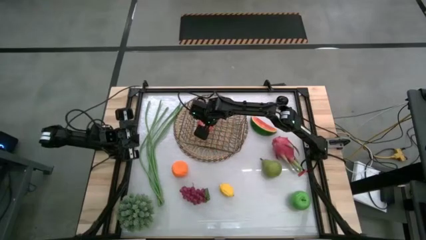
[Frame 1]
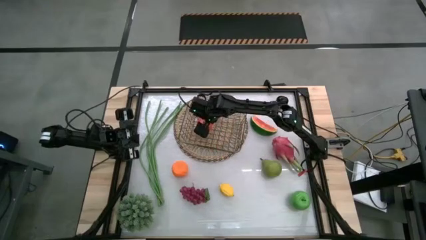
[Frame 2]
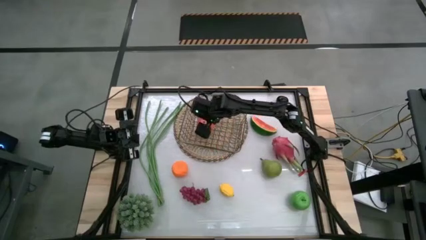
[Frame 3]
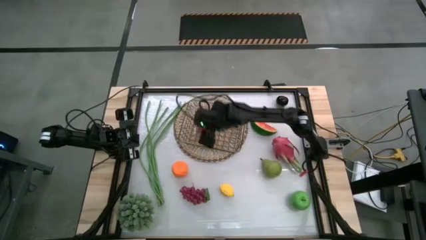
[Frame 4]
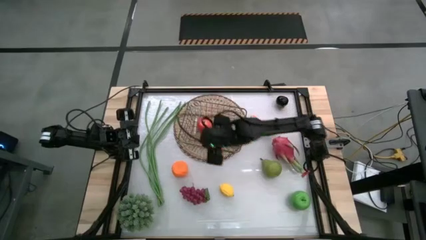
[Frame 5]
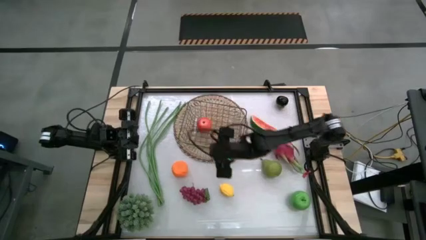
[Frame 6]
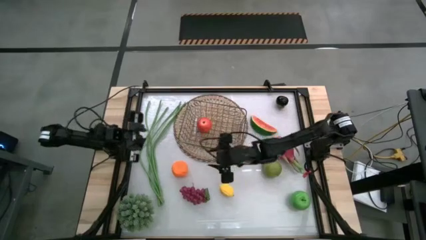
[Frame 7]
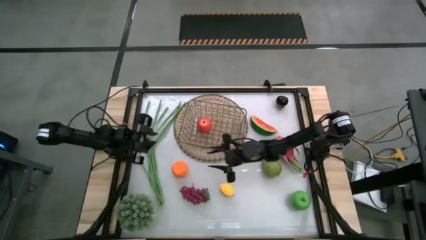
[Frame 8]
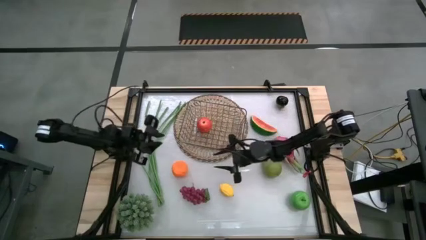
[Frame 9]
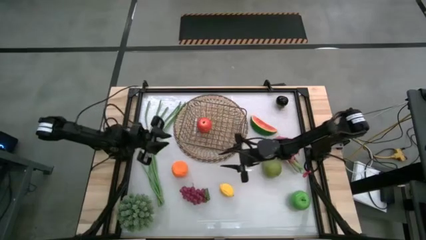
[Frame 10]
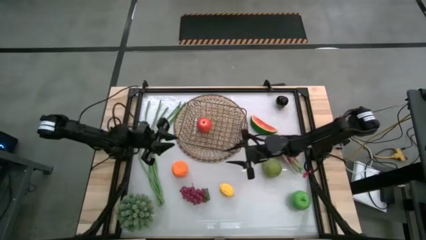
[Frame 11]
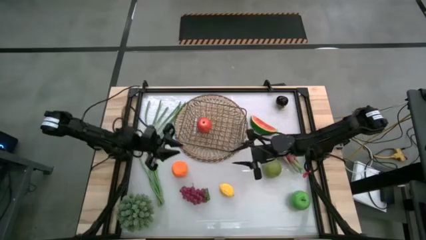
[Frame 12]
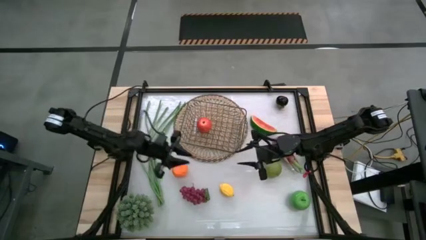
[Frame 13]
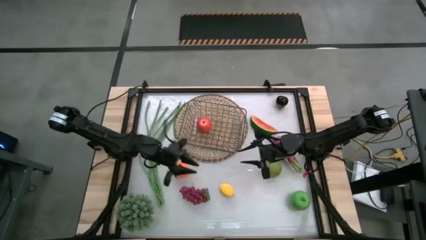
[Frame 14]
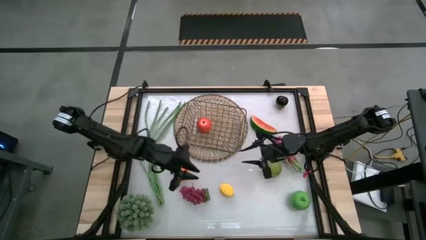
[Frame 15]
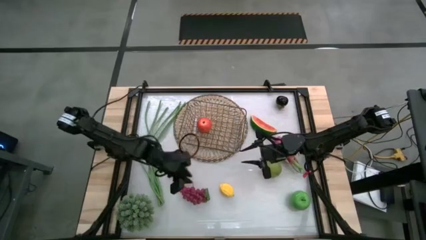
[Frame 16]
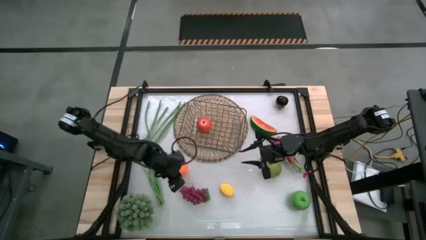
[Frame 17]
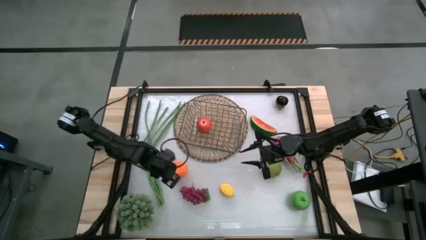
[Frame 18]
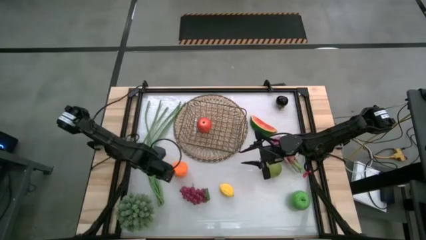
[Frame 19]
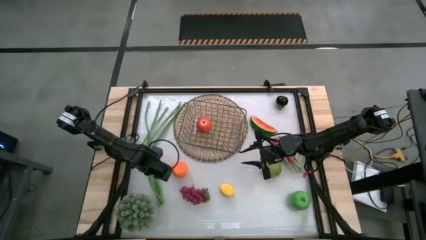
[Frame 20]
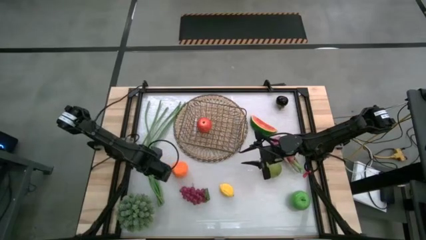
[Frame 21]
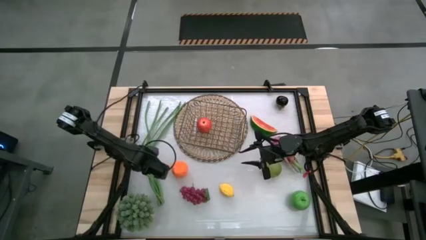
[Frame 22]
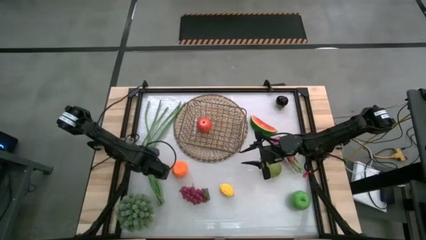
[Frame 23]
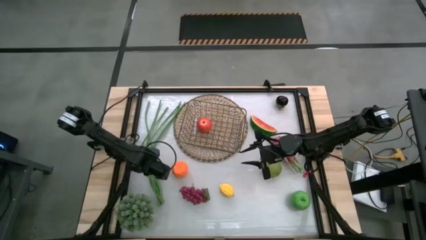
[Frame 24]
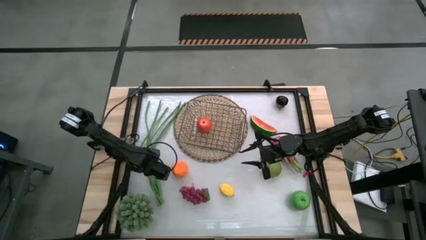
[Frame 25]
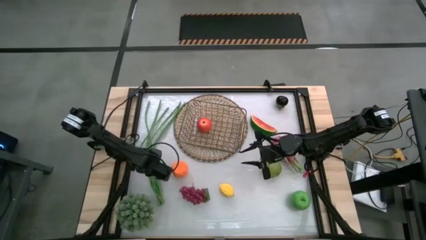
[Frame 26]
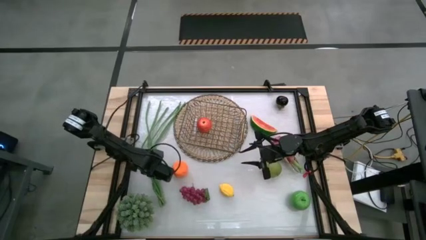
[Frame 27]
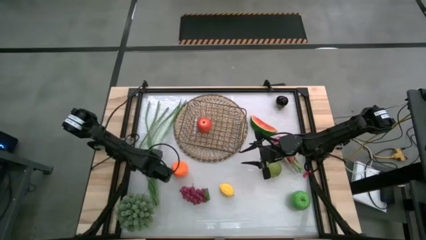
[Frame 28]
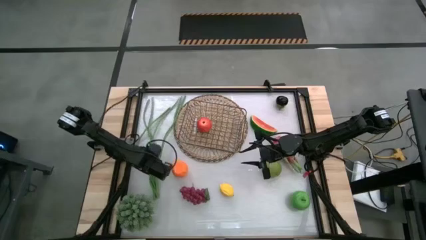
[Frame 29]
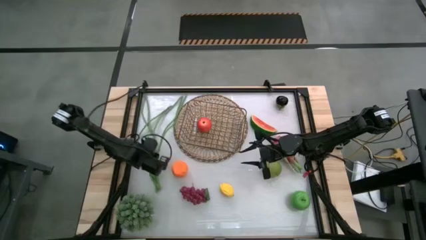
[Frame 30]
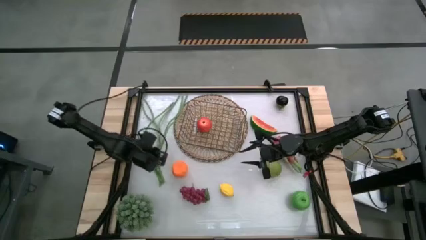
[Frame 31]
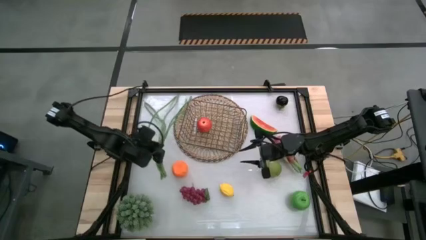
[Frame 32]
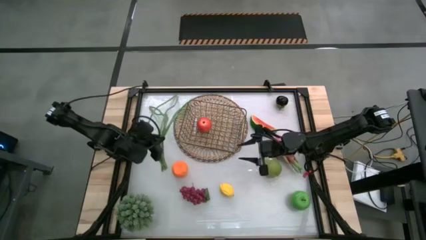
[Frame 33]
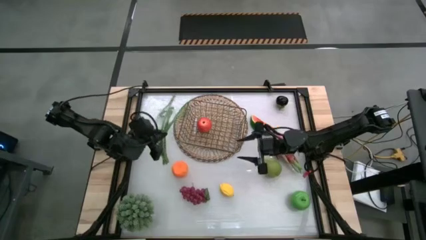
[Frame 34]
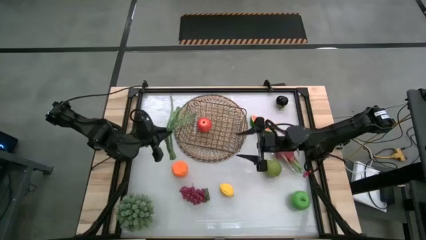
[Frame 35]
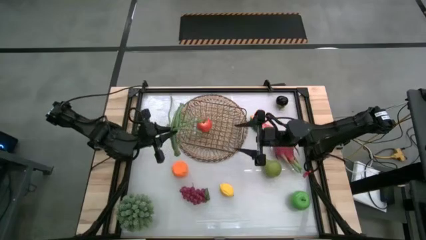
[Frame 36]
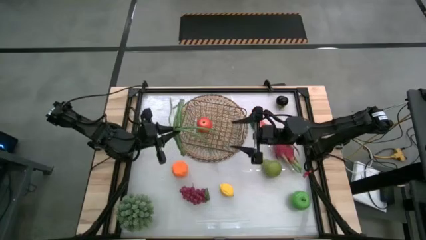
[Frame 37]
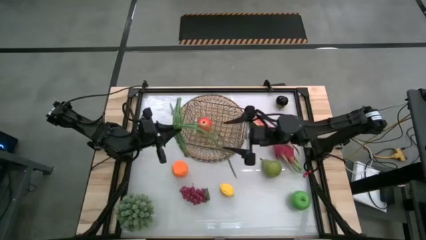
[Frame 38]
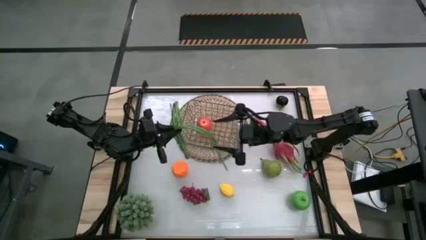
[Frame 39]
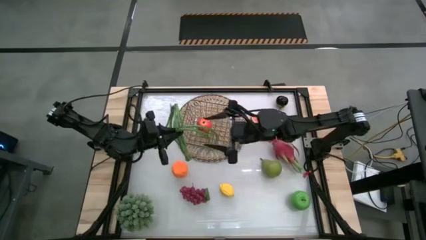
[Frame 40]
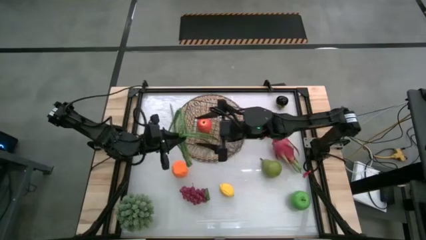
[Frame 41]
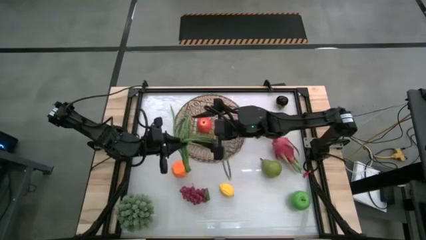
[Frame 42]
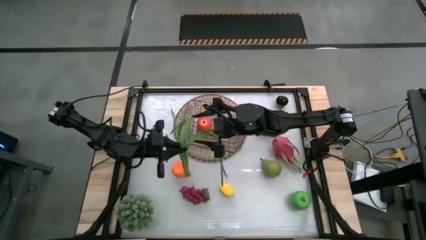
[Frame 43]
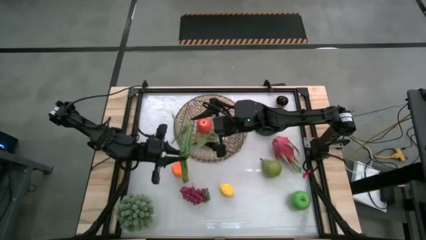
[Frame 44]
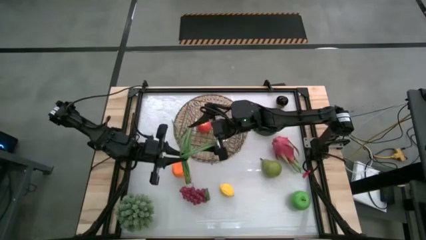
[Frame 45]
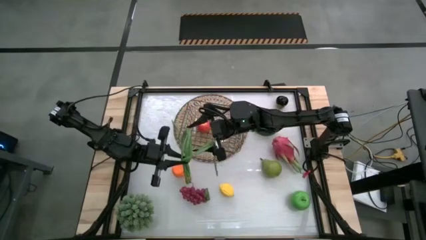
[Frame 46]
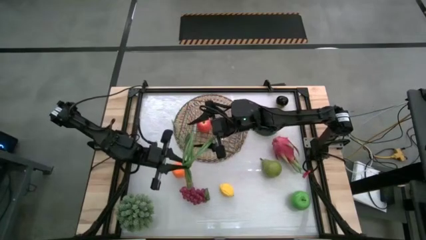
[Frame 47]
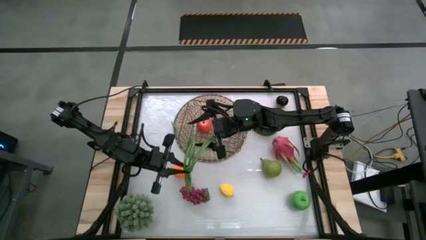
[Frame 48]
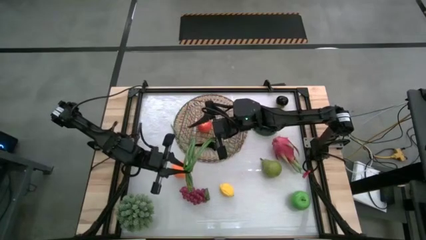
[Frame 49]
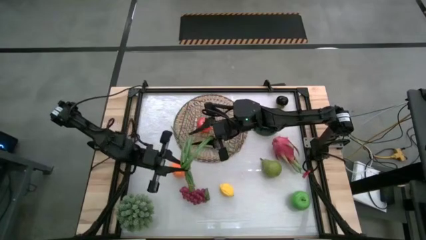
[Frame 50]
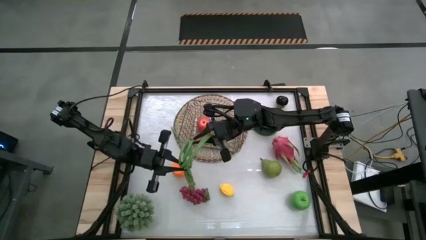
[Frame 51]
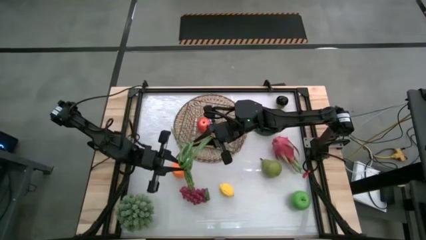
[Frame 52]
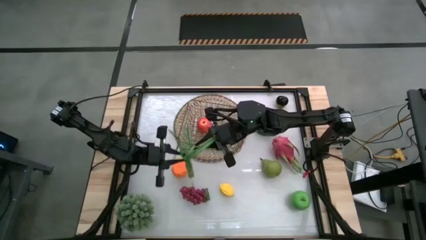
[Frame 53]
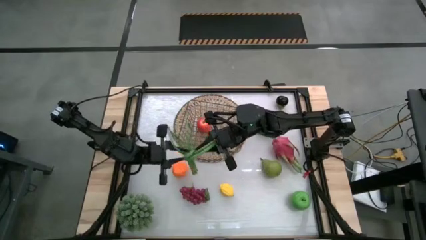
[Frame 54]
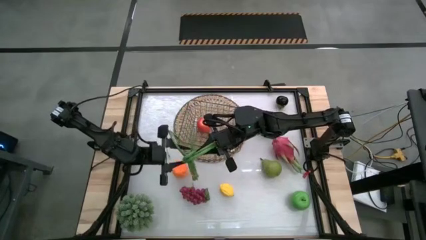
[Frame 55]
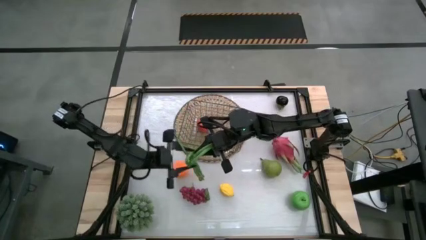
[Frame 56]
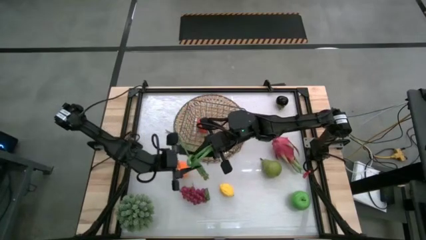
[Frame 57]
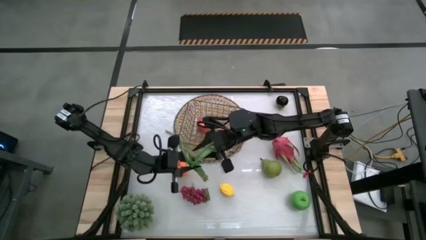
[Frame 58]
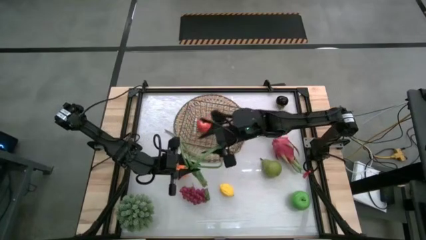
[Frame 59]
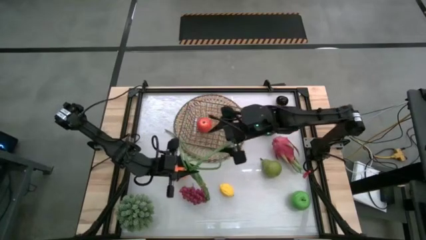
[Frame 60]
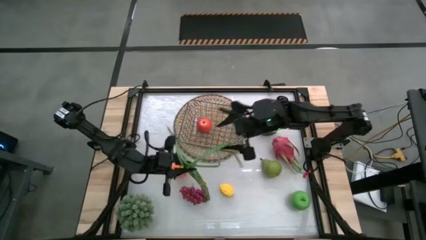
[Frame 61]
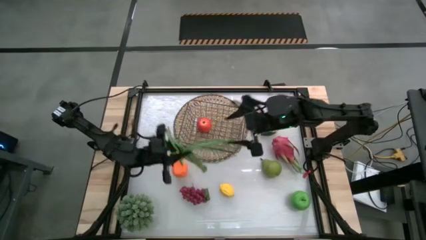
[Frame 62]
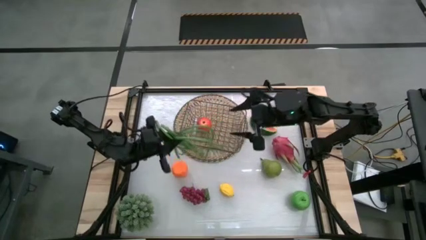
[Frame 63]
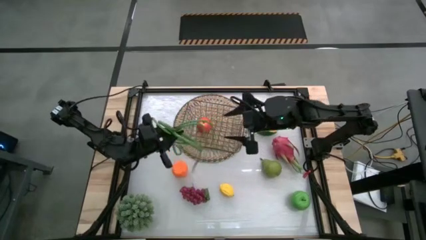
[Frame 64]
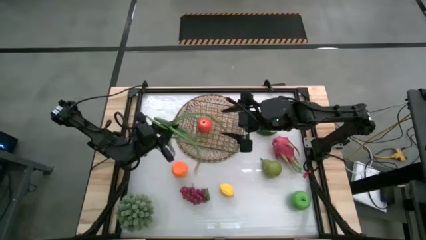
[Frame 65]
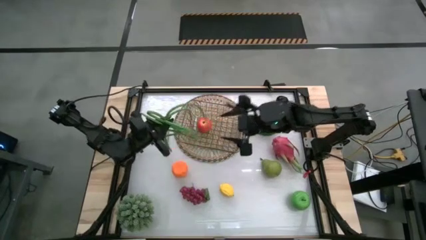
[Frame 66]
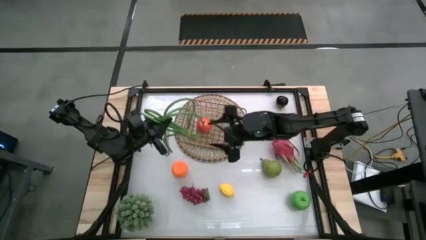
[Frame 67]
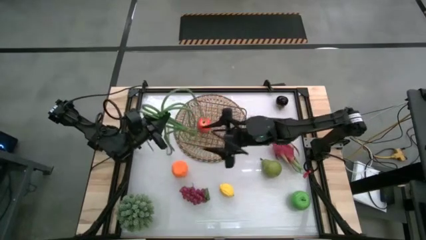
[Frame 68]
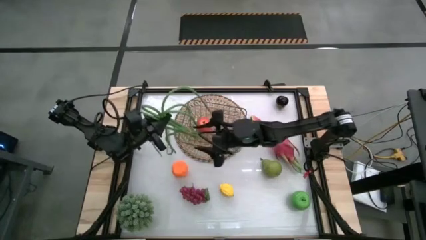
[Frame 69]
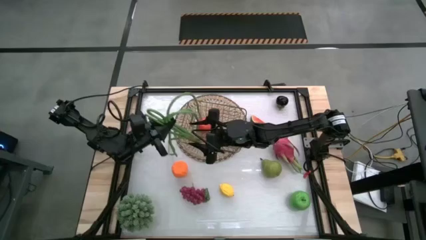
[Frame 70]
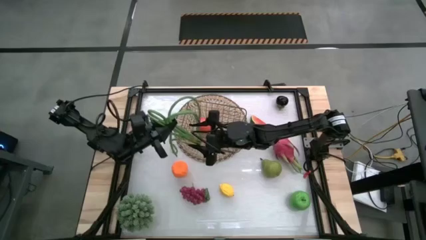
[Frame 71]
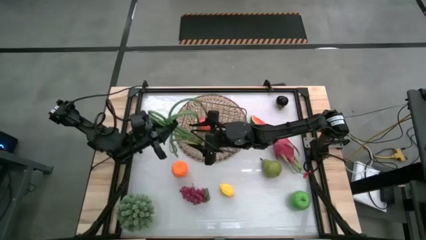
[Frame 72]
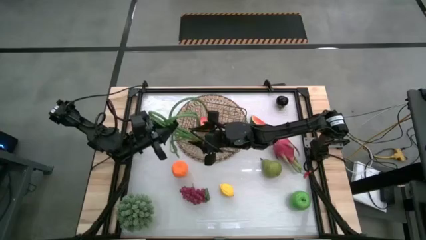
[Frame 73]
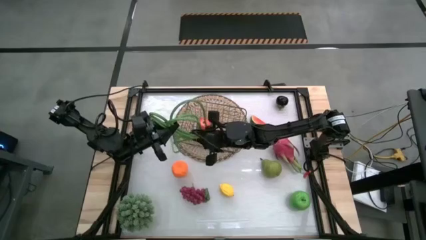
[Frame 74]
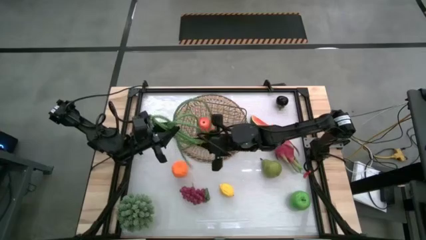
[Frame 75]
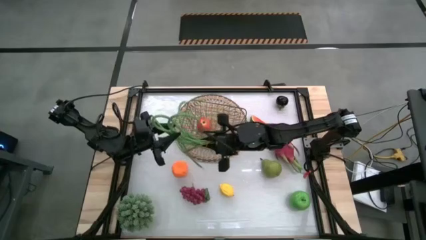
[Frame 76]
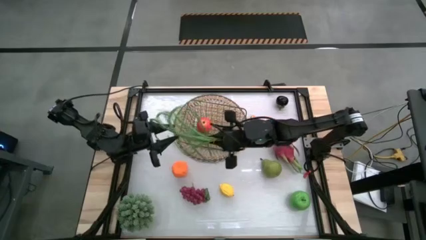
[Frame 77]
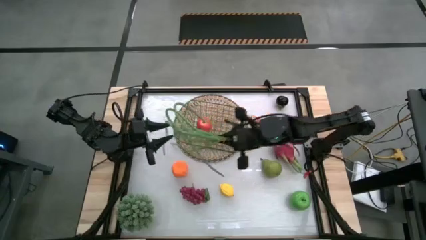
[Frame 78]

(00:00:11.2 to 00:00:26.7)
Task: Build produce basket
Put the string beans into the wire basket
